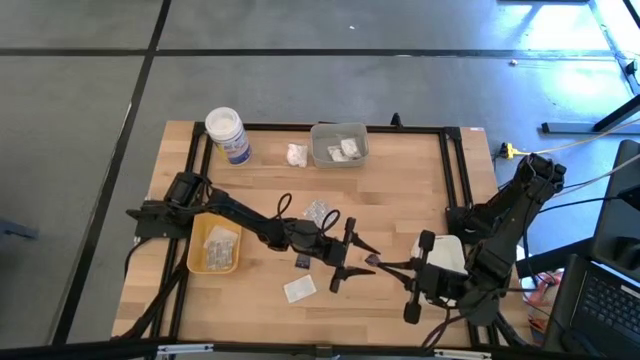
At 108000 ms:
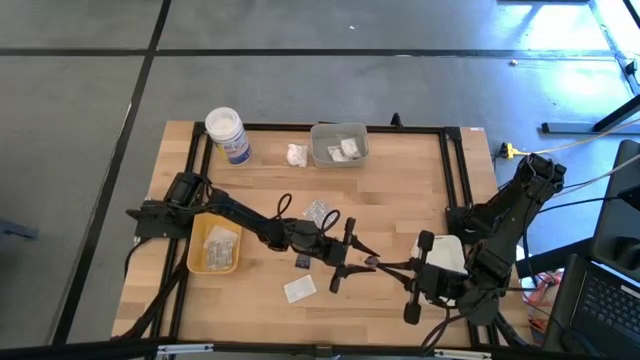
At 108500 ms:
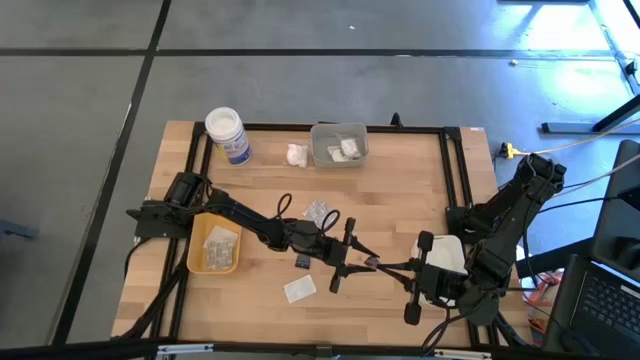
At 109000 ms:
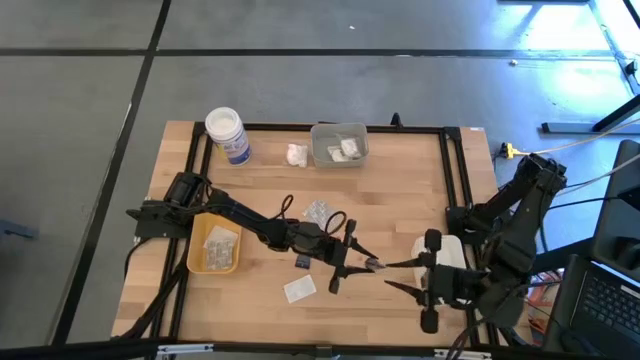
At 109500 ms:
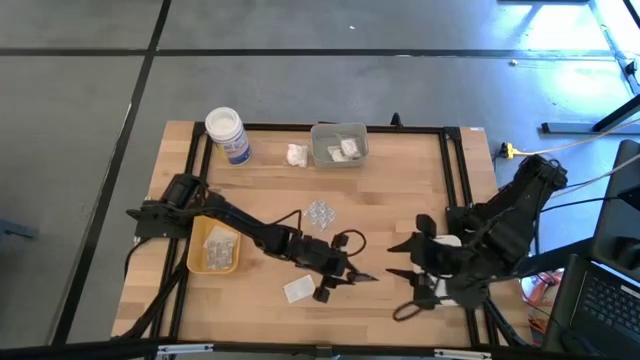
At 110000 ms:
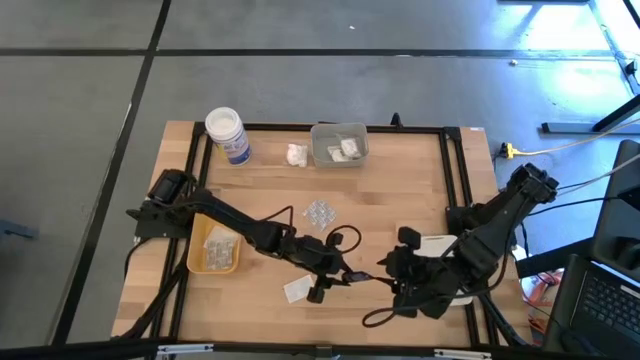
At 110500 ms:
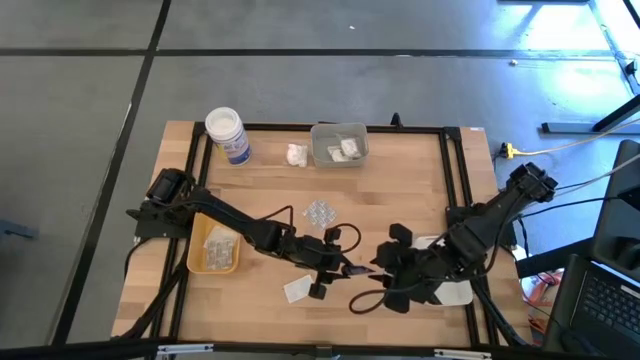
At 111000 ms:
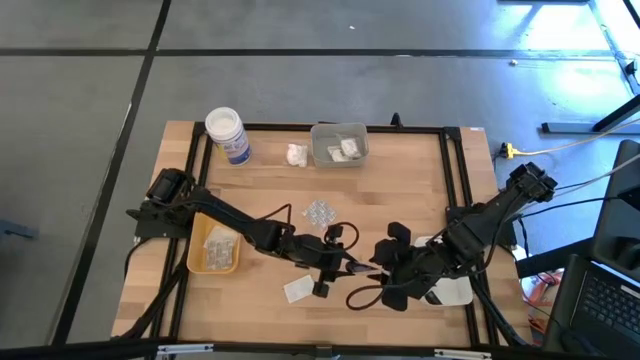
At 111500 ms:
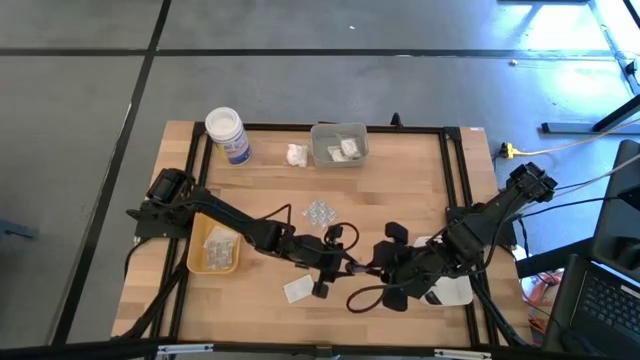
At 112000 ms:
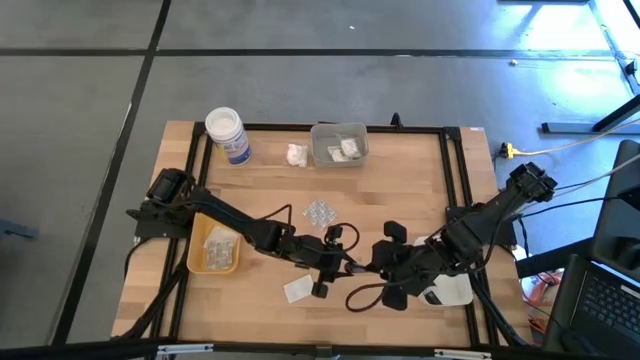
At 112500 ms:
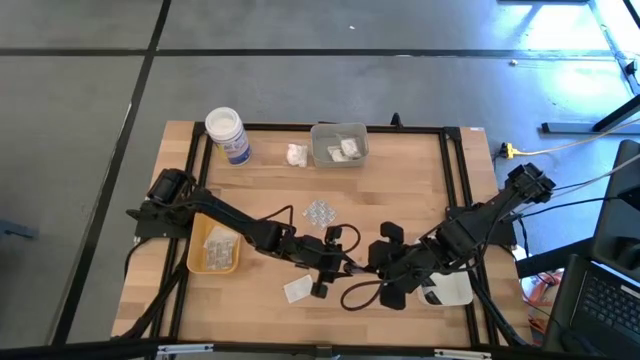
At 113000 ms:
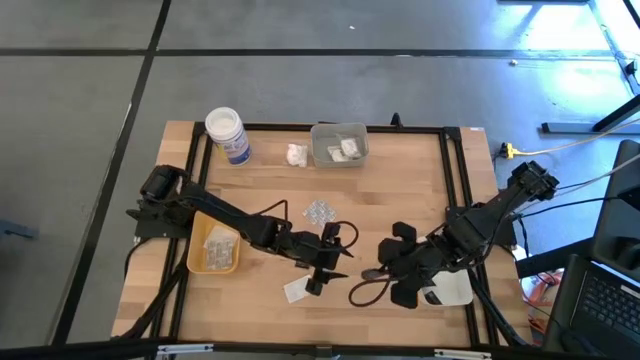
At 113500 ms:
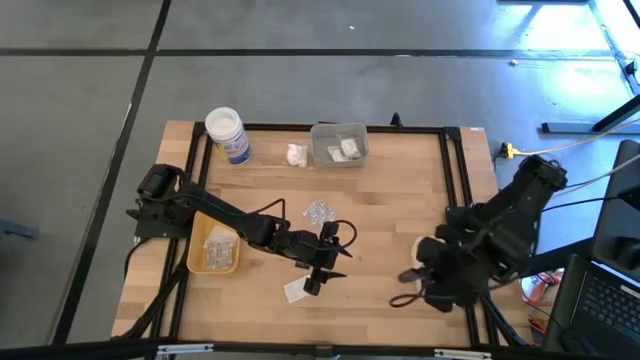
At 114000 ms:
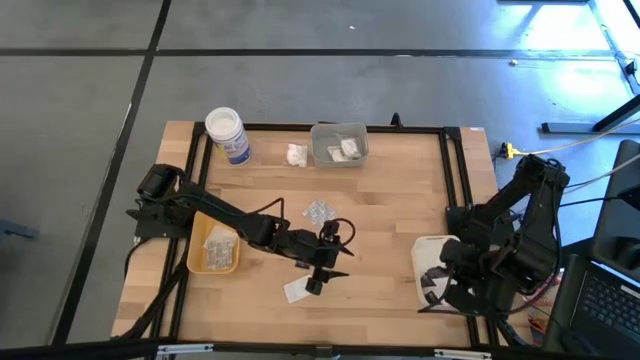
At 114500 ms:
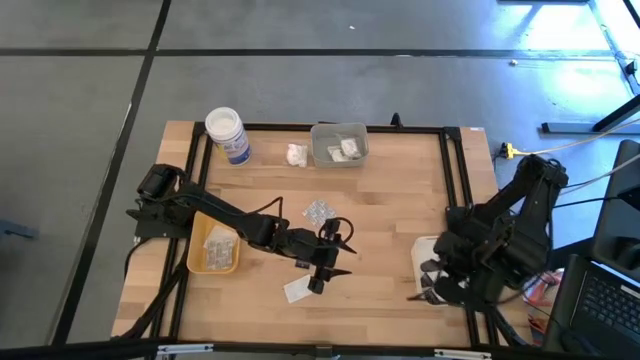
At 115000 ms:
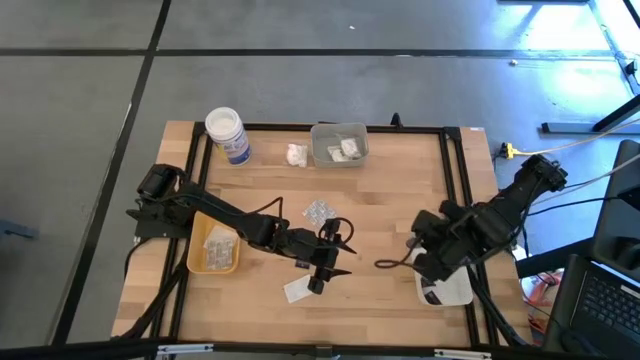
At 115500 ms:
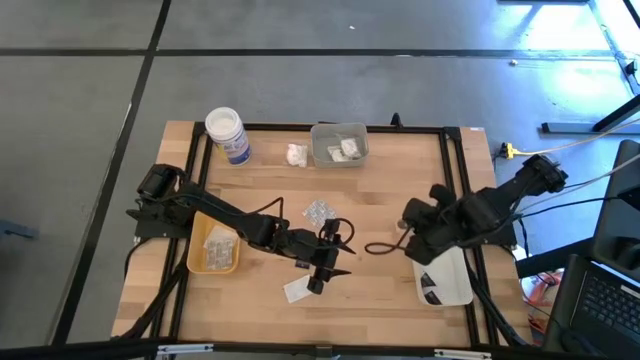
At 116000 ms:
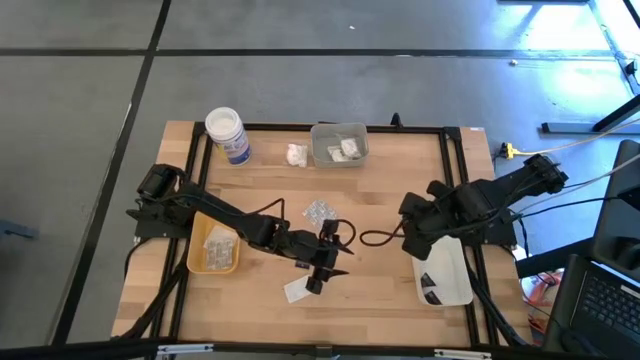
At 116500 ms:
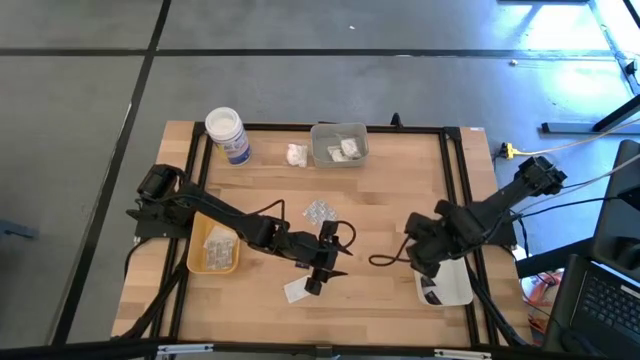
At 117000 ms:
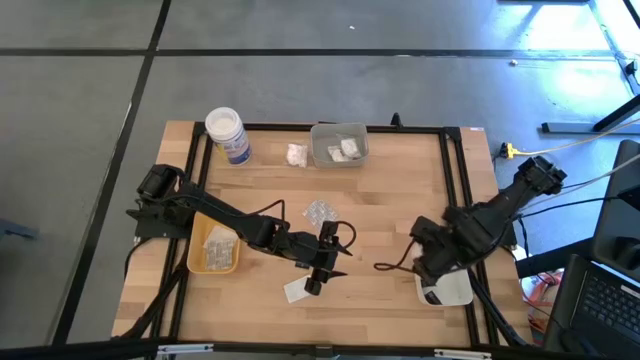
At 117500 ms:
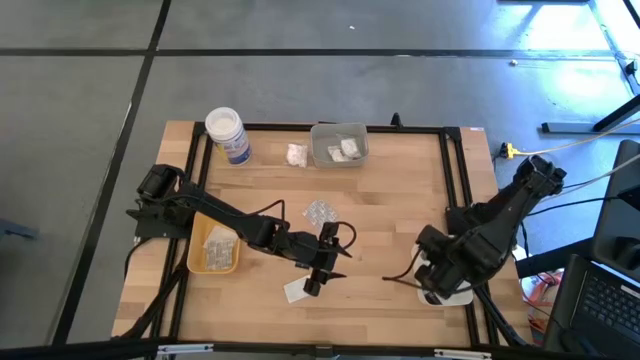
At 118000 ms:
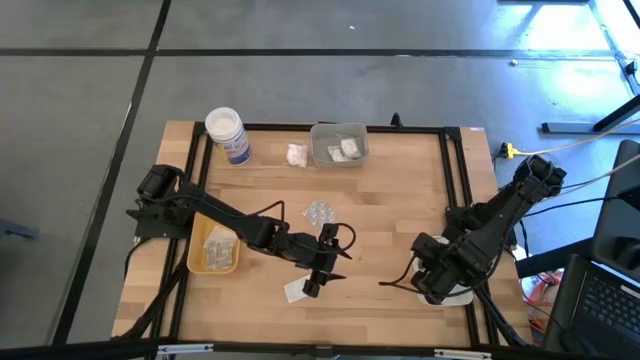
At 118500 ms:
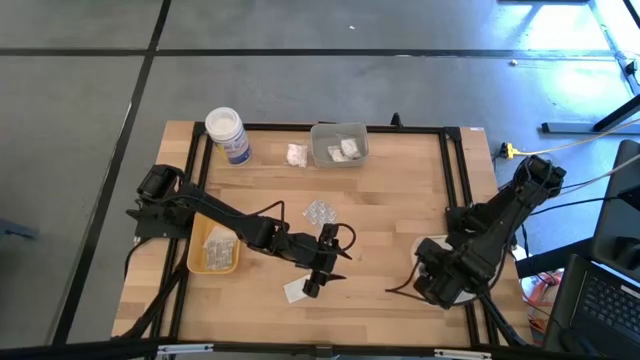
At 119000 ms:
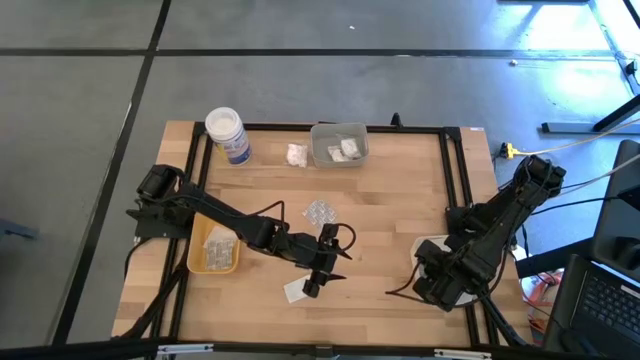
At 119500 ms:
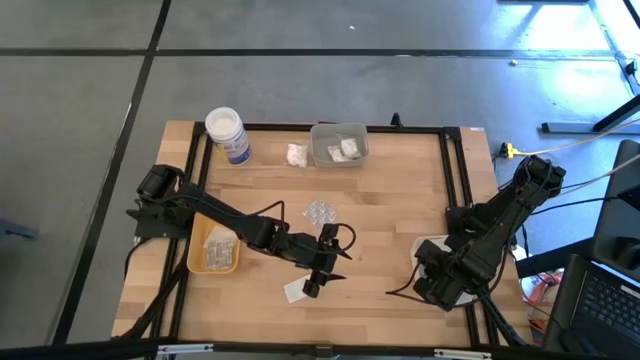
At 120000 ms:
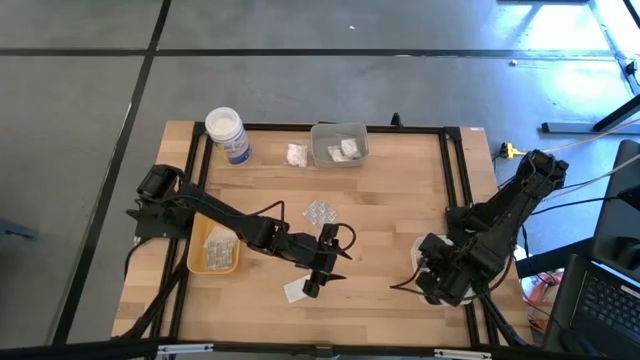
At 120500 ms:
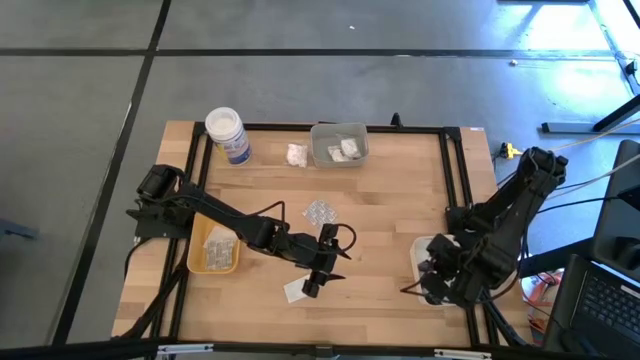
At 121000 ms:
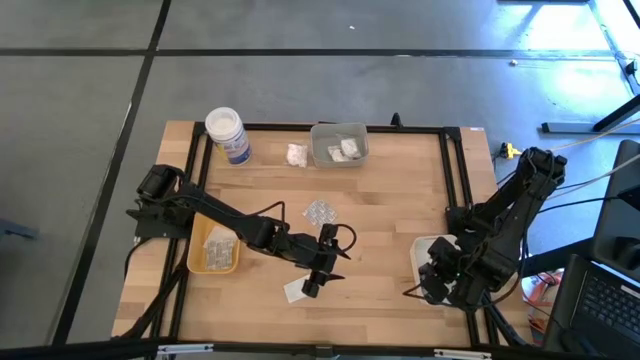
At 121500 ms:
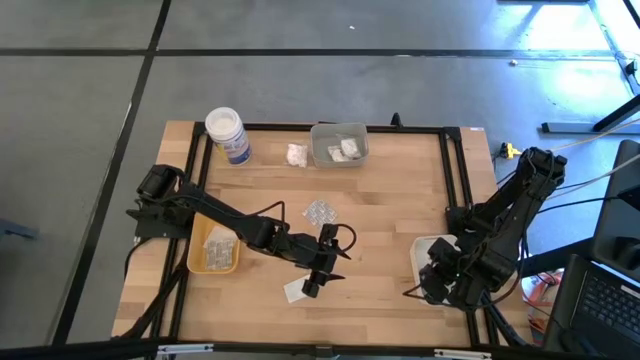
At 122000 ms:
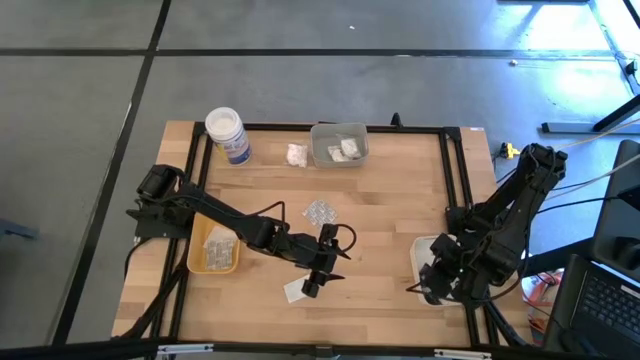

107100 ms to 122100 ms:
Task: Pick & Place Travel size toiletries
Put the blue shaving cream into the white bin

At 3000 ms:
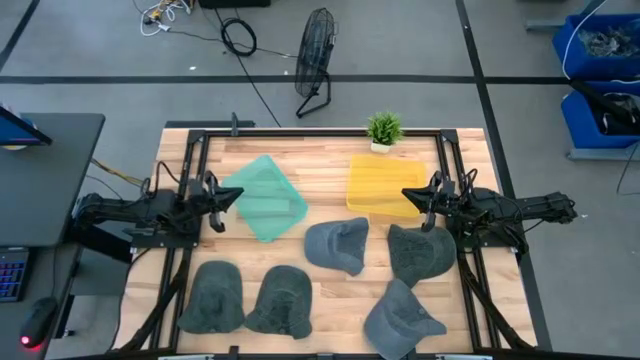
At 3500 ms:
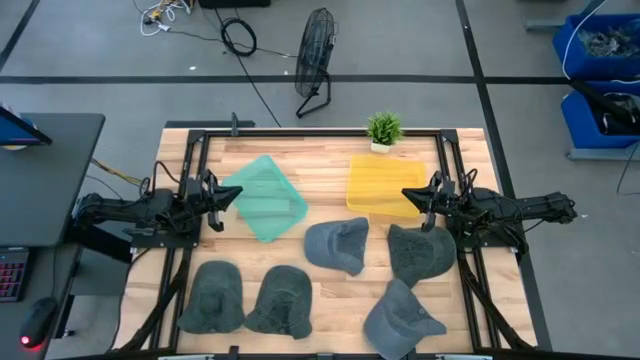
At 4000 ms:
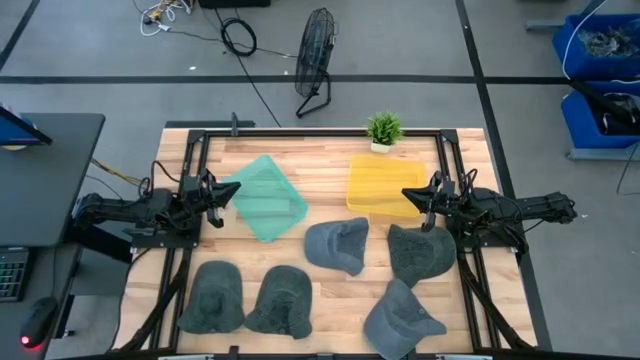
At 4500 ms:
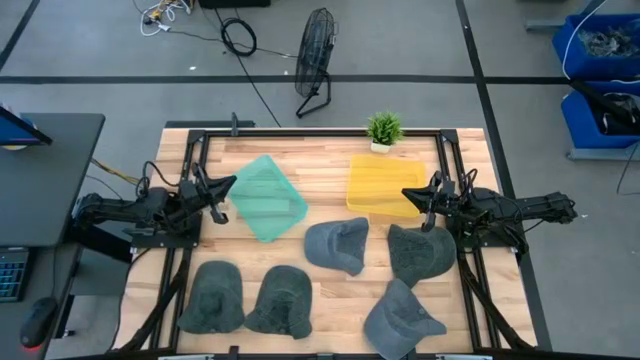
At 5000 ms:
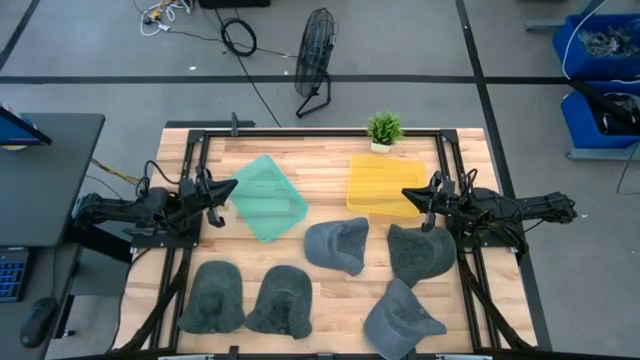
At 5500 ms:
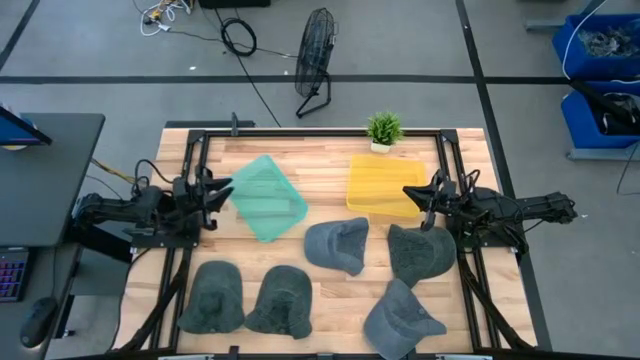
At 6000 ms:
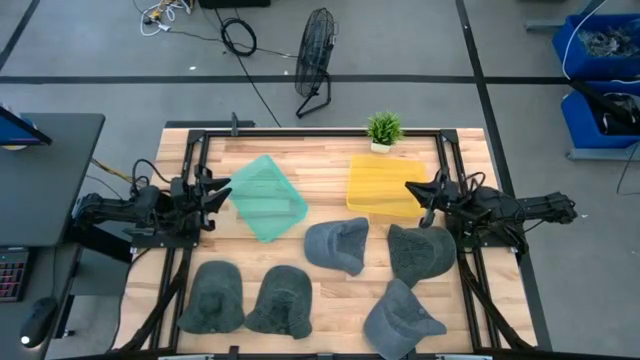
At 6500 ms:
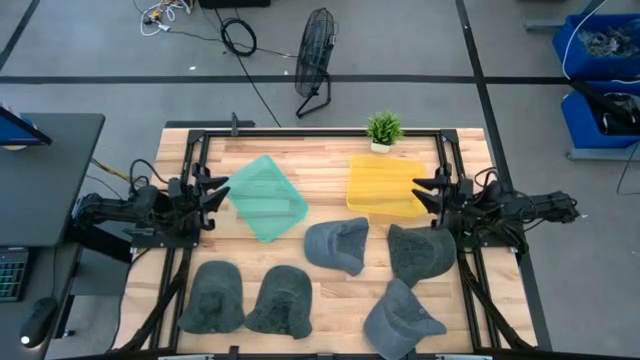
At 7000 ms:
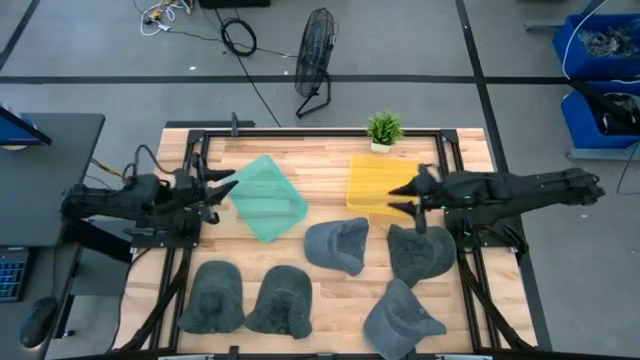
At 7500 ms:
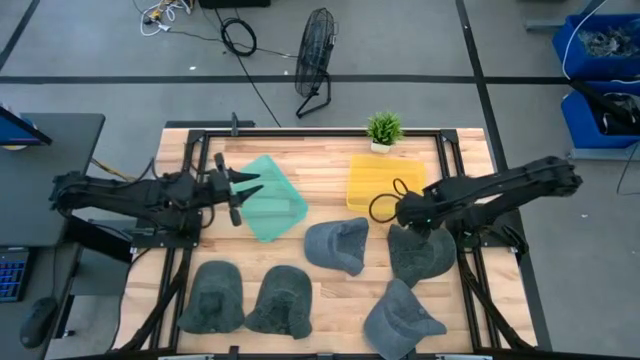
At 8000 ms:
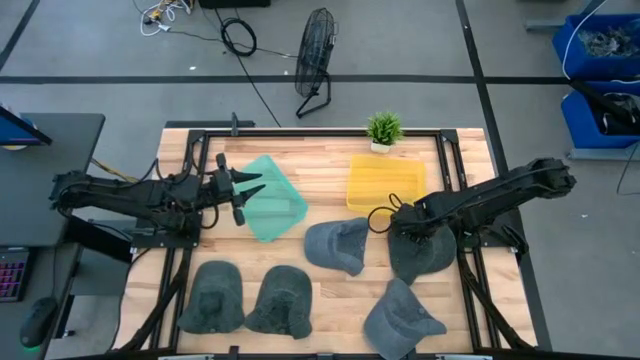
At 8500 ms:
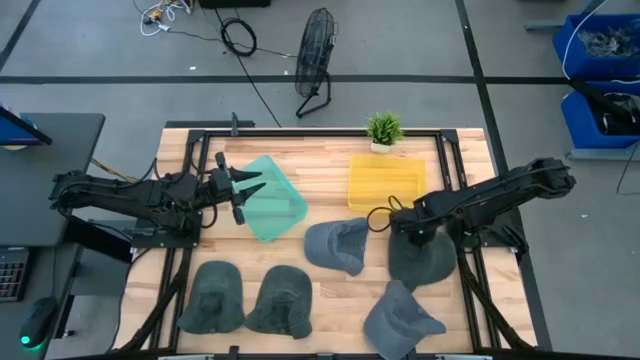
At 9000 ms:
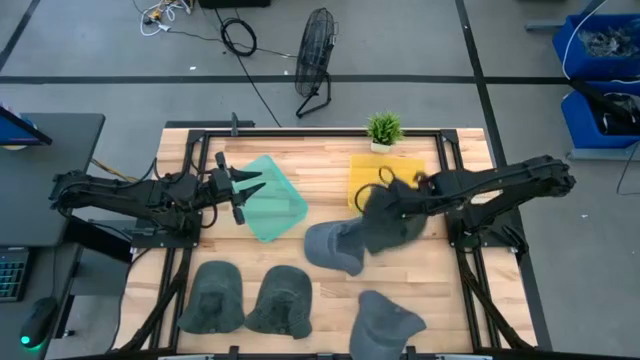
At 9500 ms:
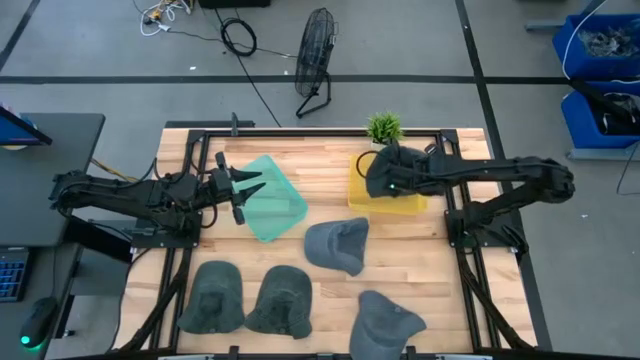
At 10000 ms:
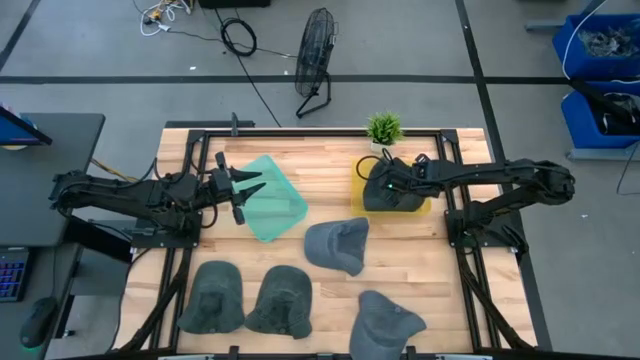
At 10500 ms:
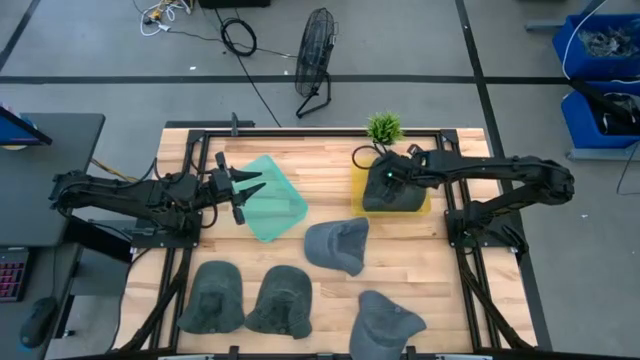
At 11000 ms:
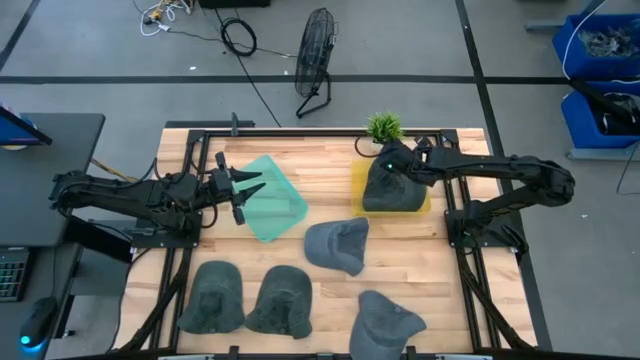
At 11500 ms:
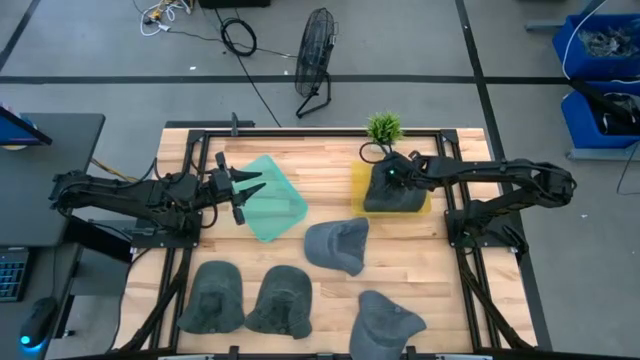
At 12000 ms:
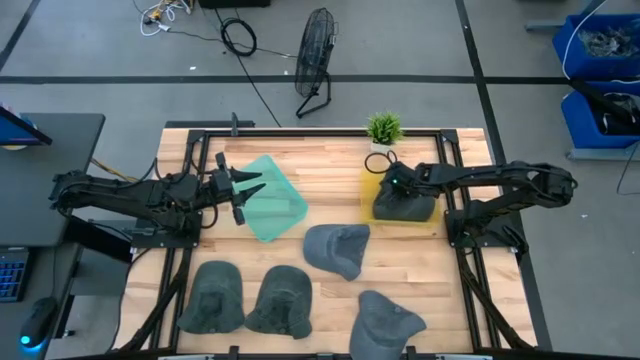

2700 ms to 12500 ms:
Task: Pick & Place hat
Put the right black cap into the yellow bin
